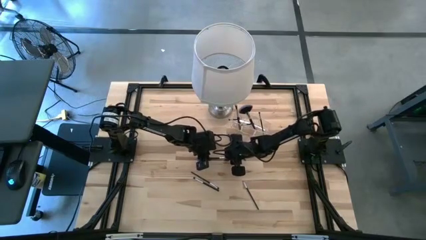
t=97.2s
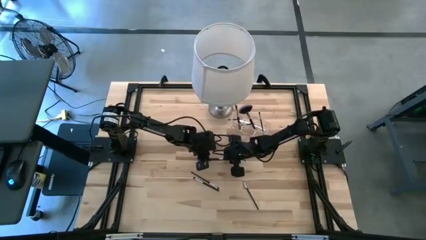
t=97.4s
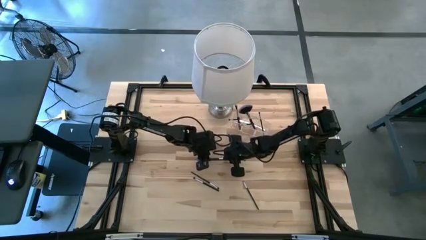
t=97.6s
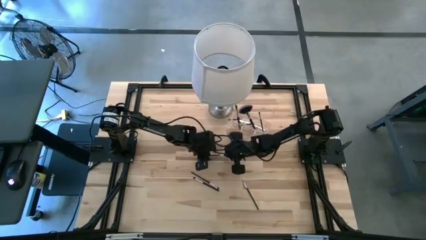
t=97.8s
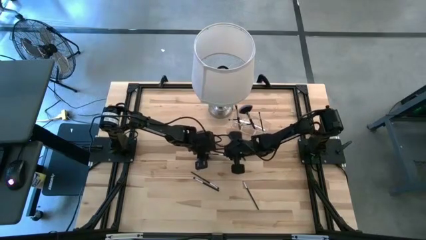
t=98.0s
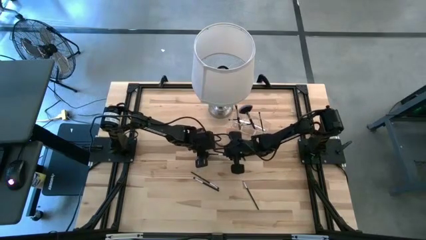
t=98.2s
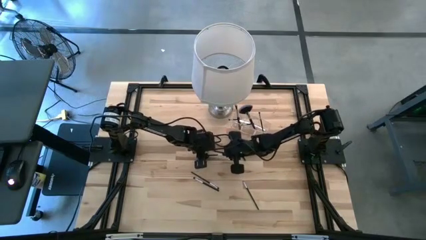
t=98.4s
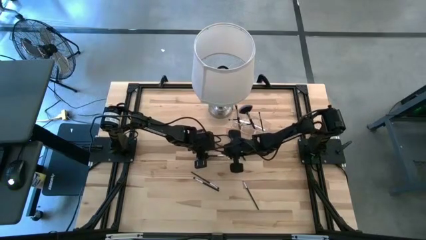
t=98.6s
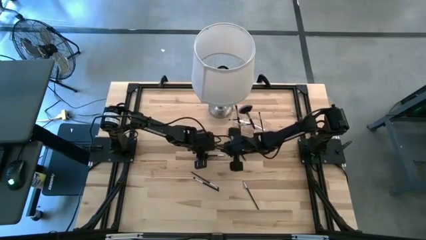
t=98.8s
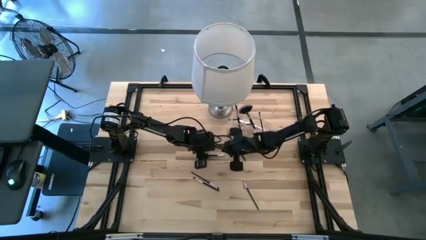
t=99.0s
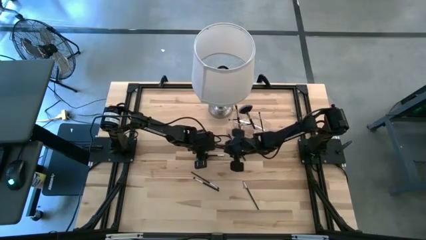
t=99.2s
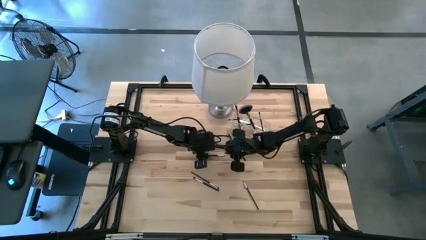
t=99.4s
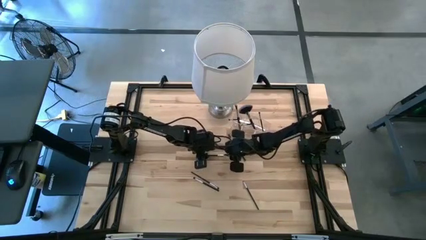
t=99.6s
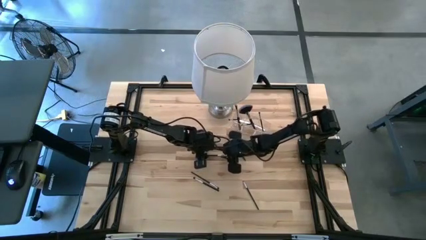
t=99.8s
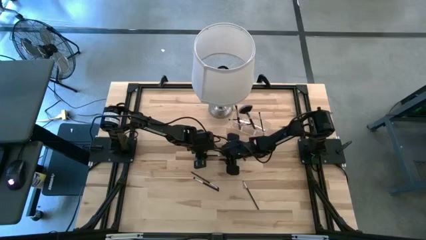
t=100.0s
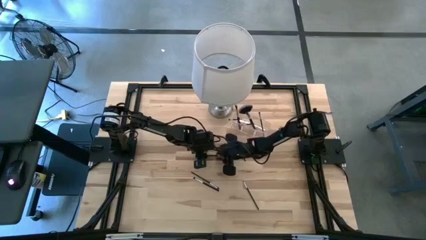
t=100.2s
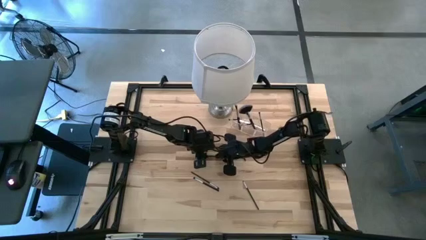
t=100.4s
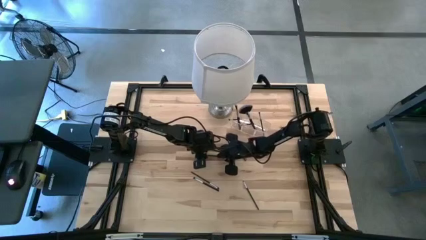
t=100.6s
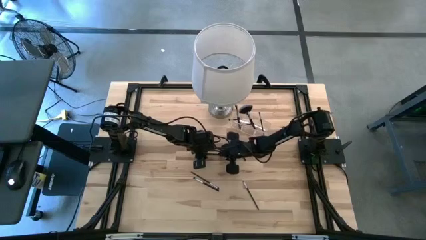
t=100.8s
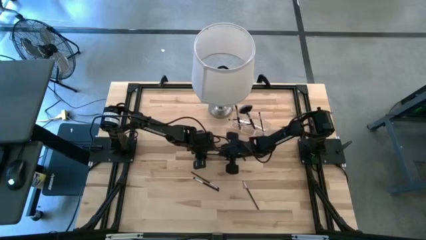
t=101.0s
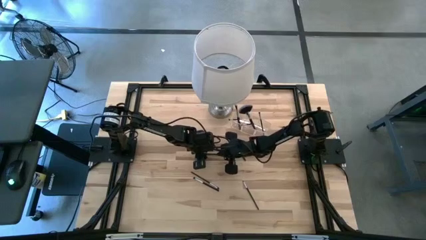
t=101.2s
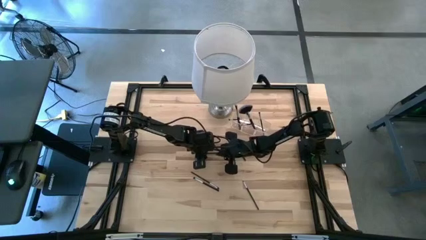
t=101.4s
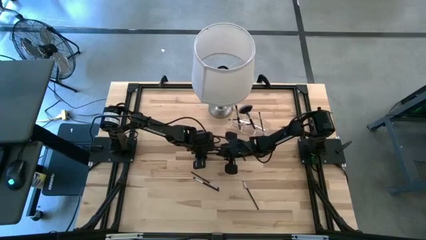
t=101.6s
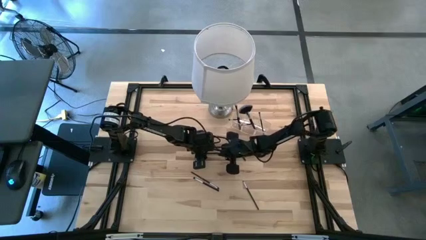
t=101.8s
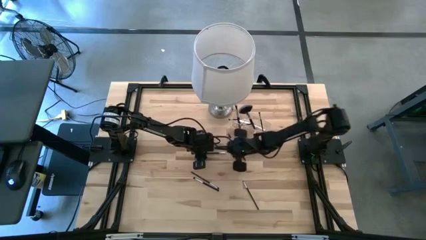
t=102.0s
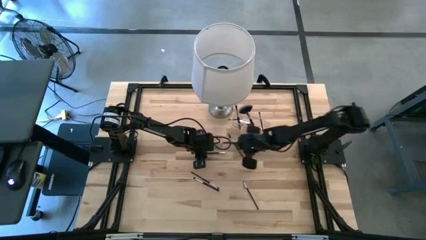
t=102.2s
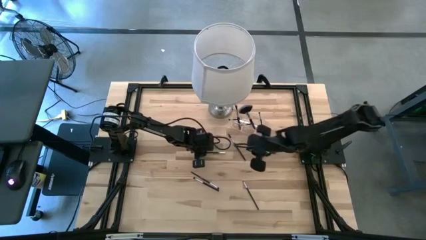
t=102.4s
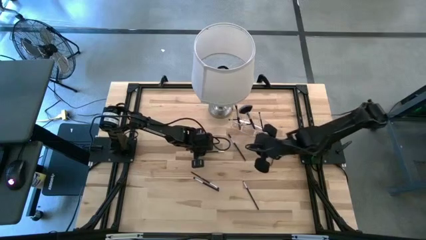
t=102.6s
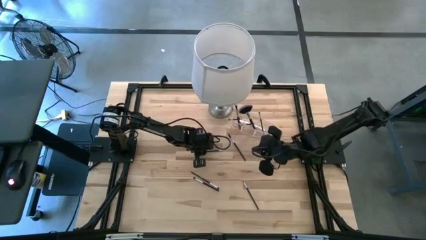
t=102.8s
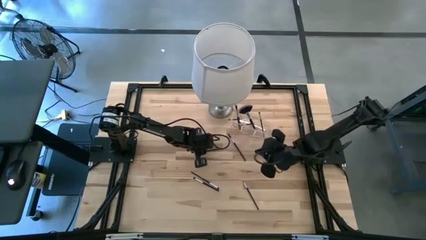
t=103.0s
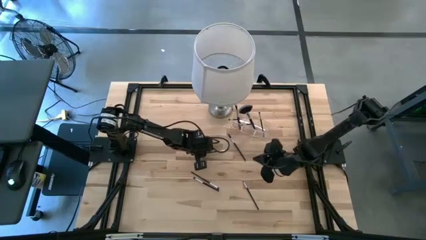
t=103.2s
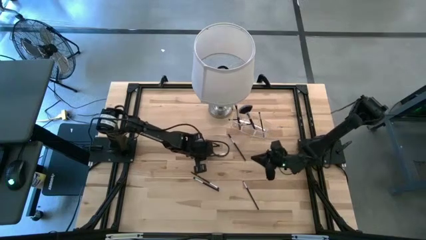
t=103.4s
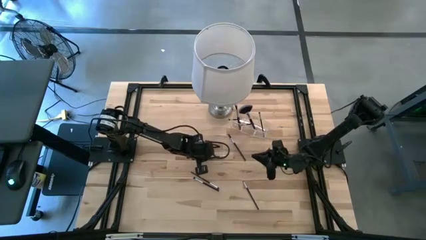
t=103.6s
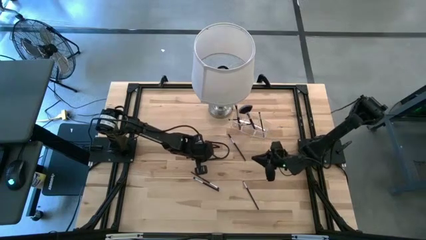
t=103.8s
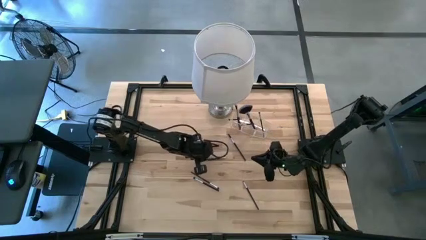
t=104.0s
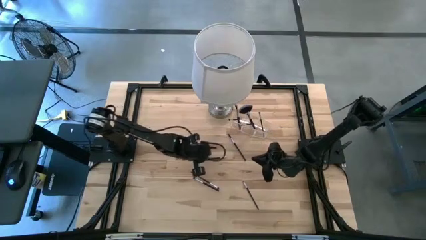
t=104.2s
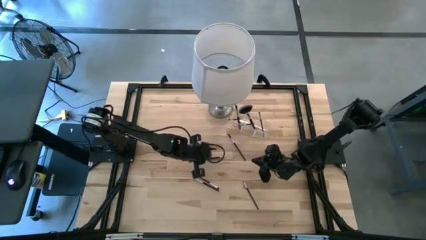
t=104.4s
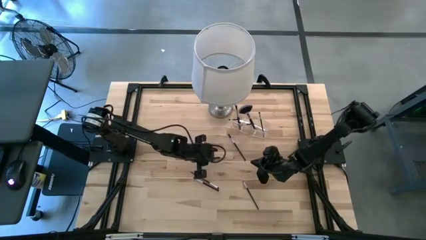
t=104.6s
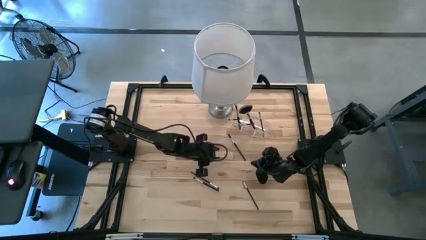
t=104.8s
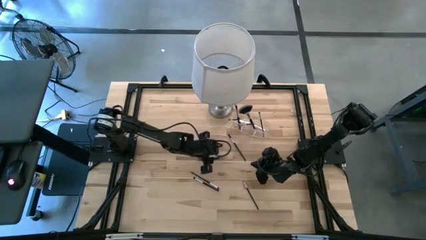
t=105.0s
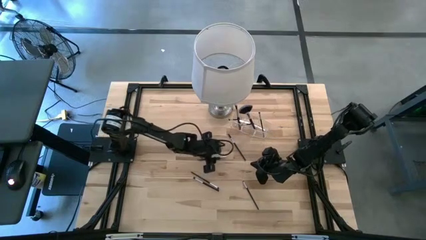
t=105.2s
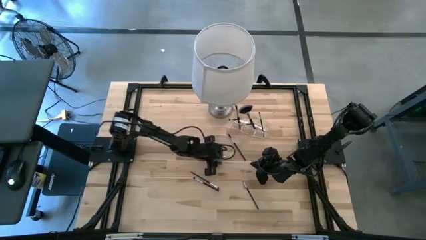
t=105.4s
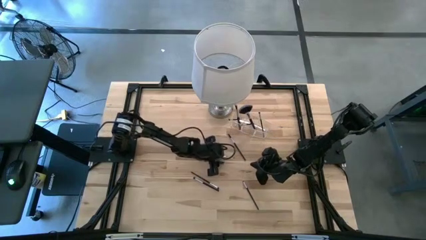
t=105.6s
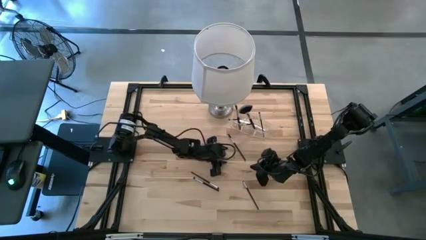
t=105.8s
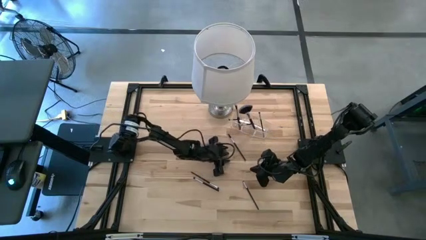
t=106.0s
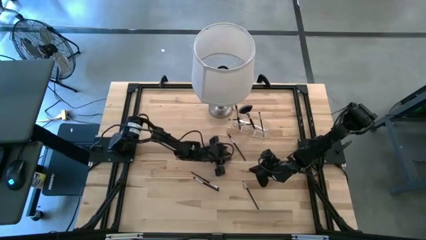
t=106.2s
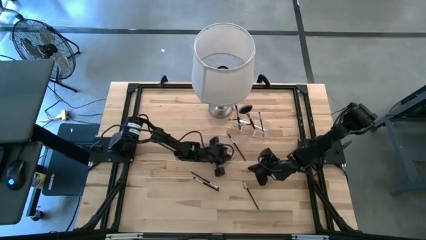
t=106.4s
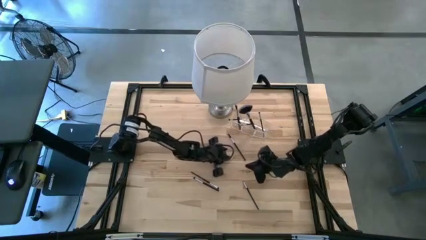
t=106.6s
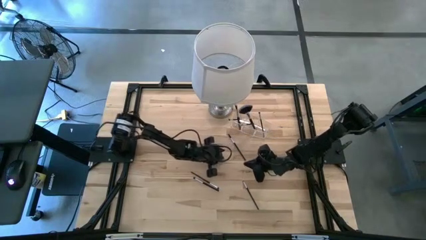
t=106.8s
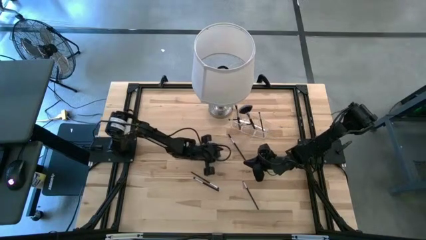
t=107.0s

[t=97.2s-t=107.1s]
Task: Put items in baskets/containers
Put the liner brush into the transparent organizer

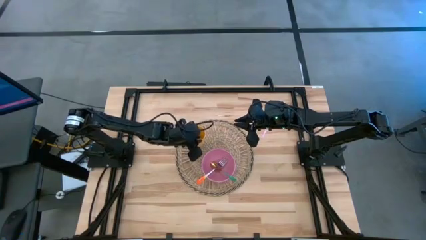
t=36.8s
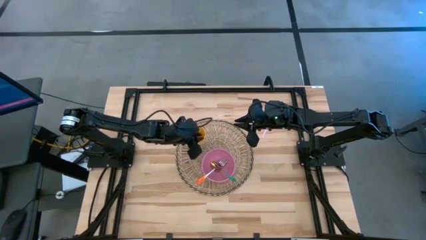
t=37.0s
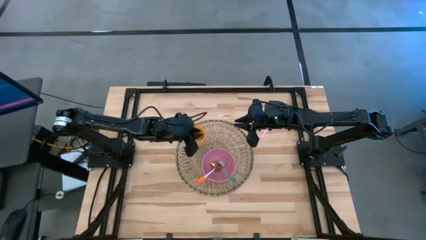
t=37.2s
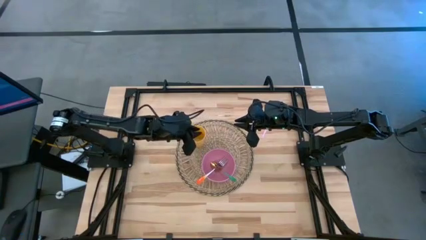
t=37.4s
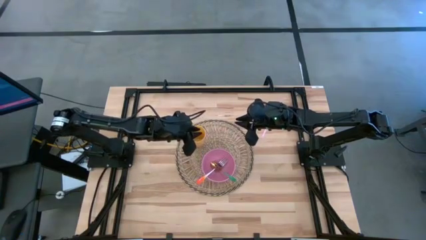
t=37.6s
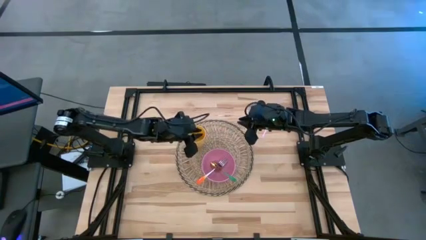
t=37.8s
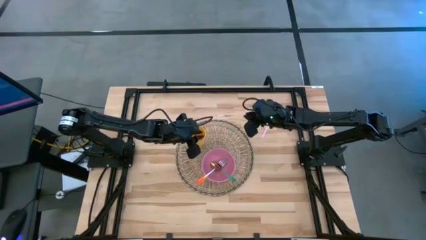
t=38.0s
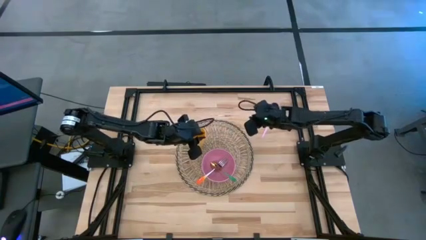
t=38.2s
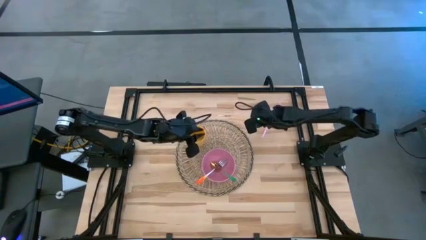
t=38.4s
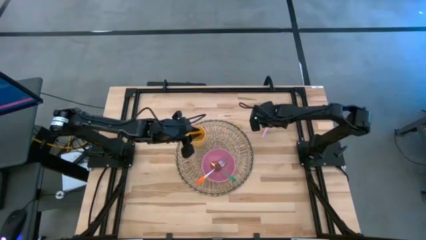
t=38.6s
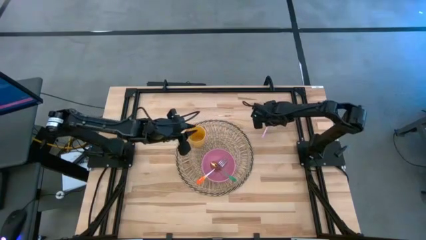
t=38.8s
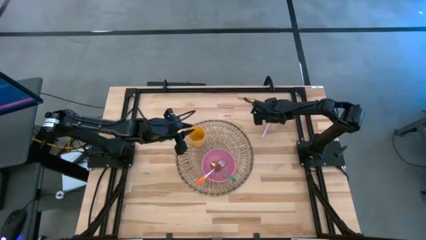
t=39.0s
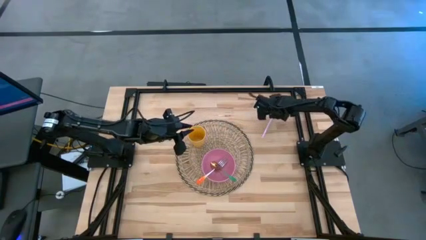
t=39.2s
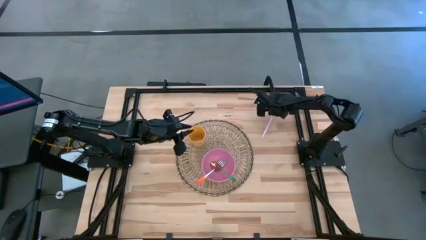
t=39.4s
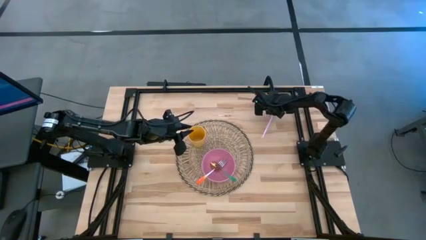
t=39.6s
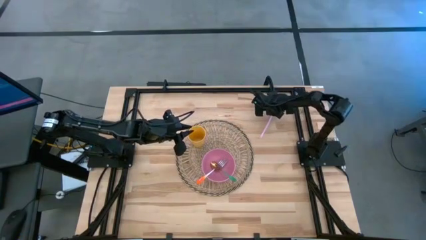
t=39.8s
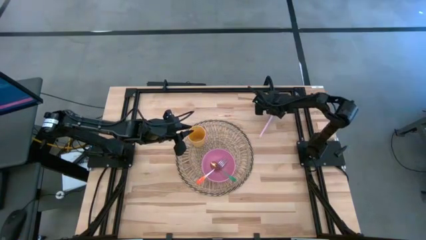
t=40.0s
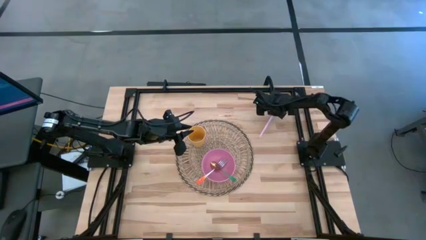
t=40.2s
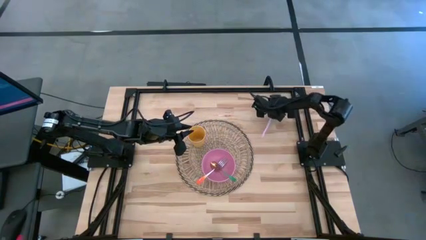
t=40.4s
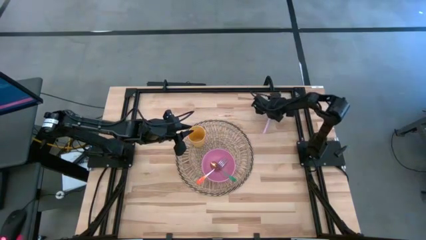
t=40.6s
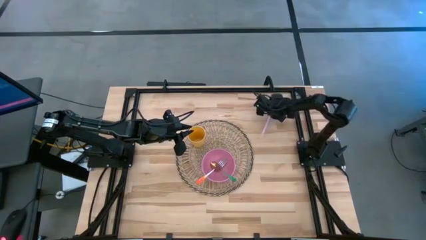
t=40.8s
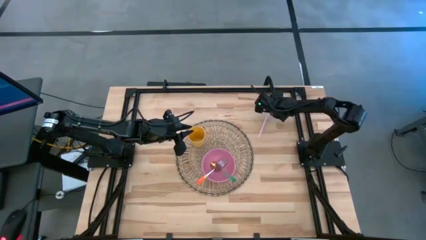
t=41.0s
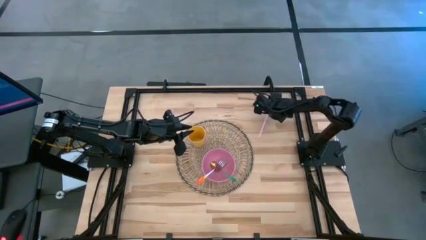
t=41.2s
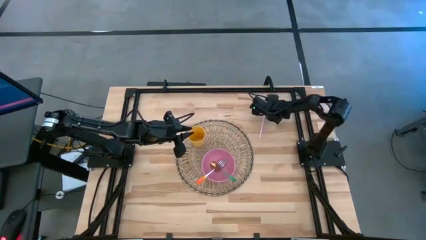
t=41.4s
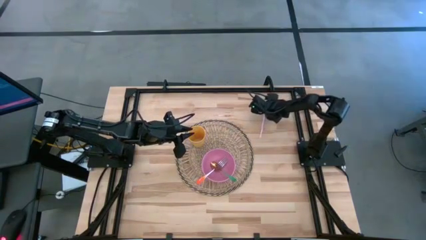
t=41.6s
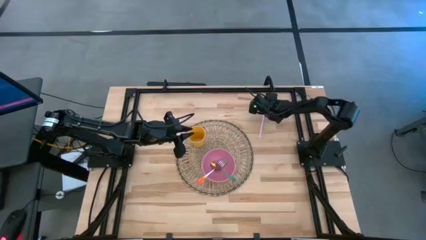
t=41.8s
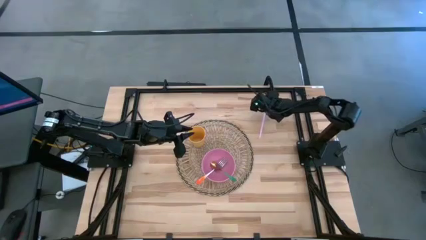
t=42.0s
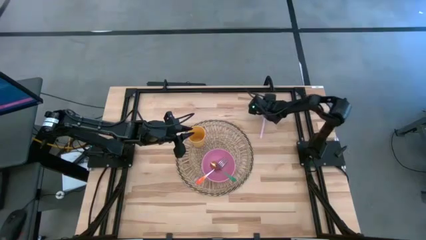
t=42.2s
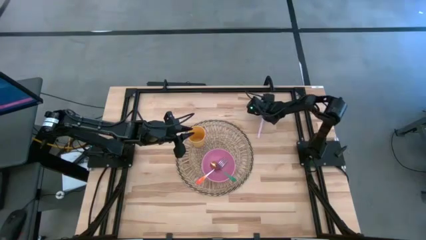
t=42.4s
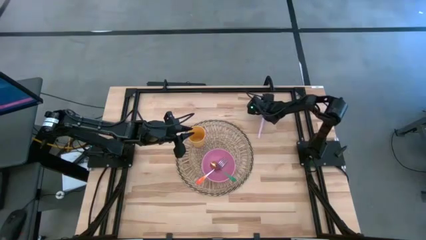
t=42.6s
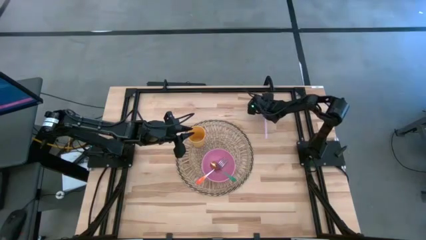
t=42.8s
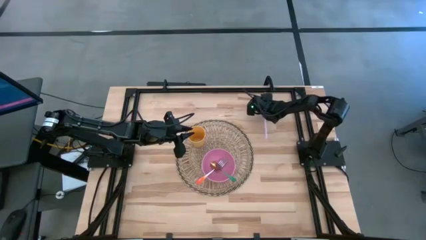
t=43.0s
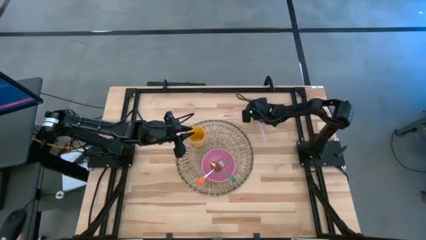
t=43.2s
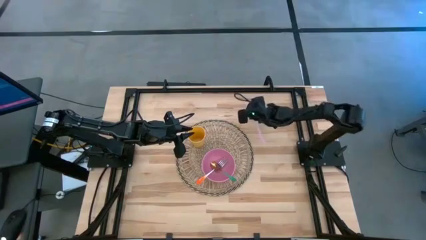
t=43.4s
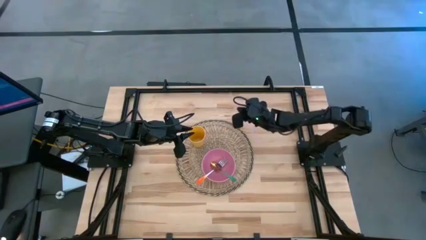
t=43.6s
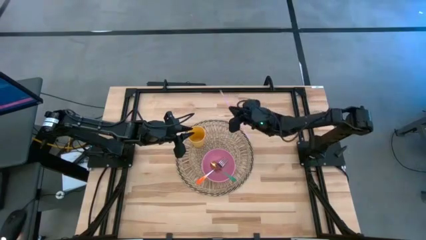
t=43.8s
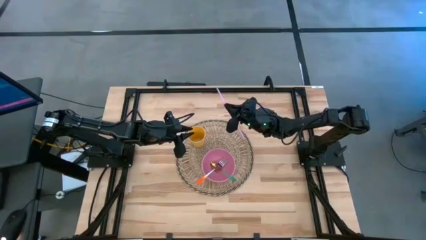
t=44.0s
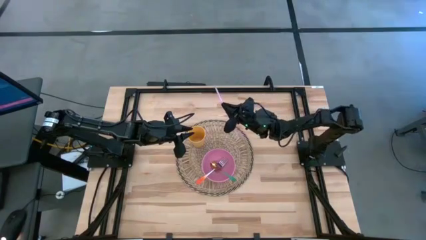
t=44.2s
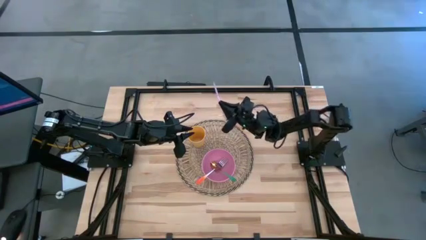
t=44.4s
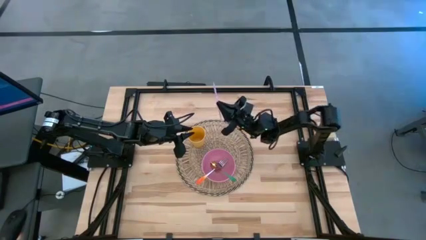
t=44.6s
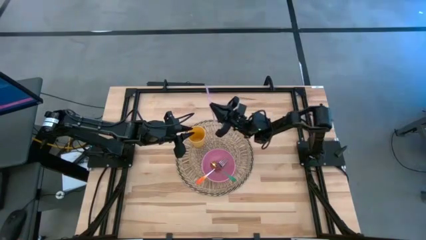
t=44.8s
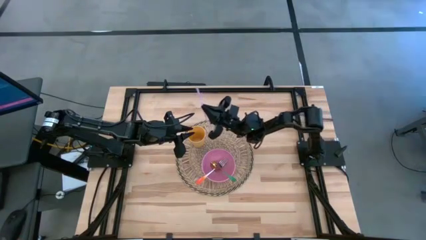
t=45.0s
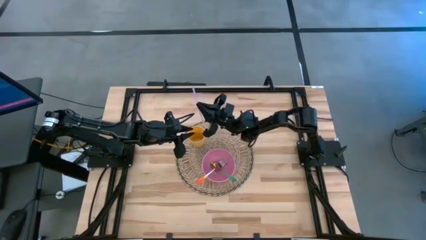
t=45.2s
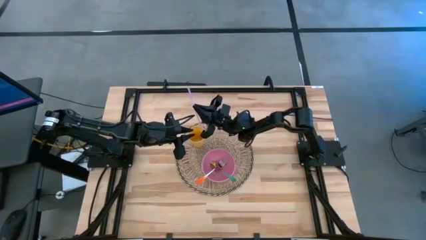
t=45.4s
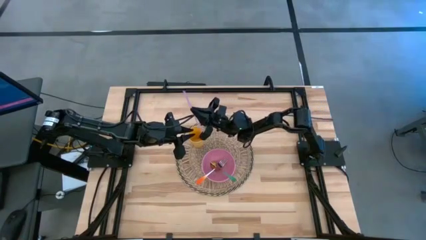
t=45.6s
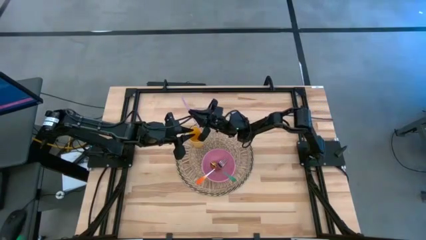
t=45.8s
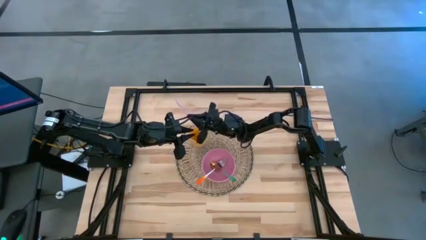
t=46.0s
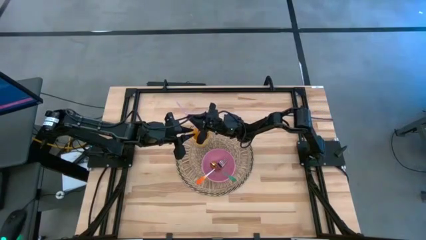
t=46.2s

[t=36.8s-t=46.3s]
Task: Pick & Place Utensil
Put the pink straw into the cup
